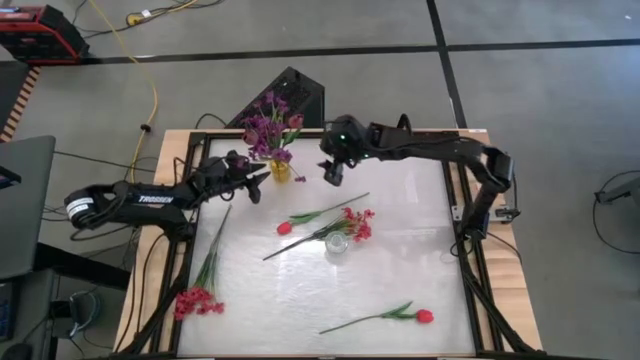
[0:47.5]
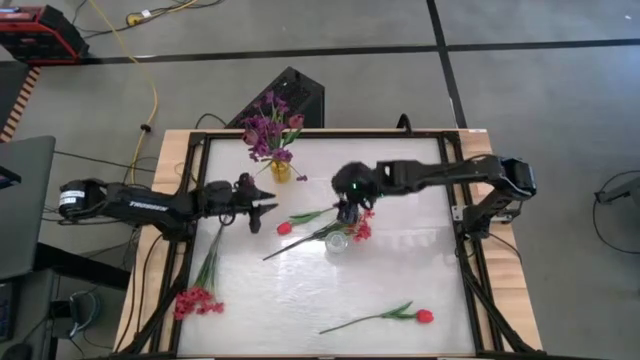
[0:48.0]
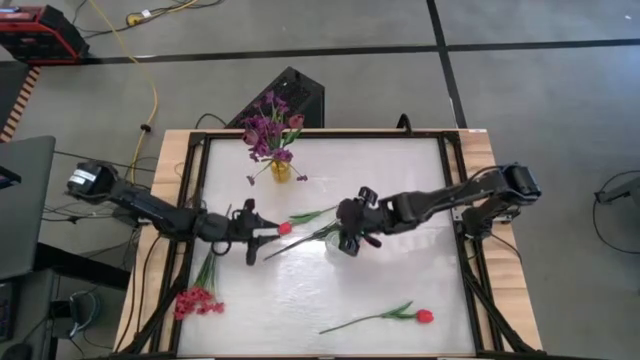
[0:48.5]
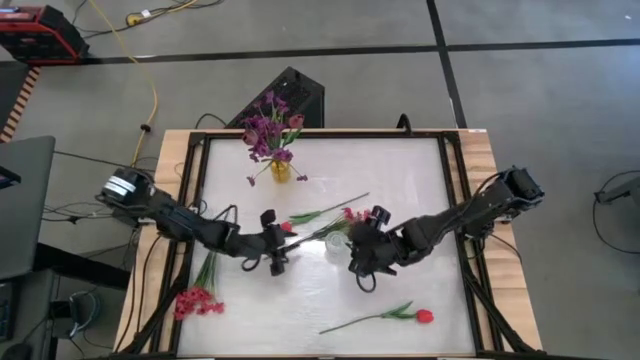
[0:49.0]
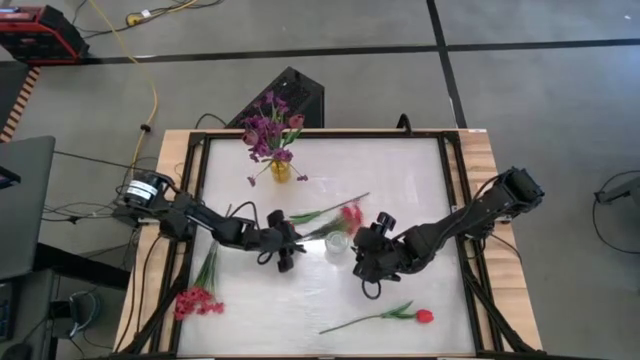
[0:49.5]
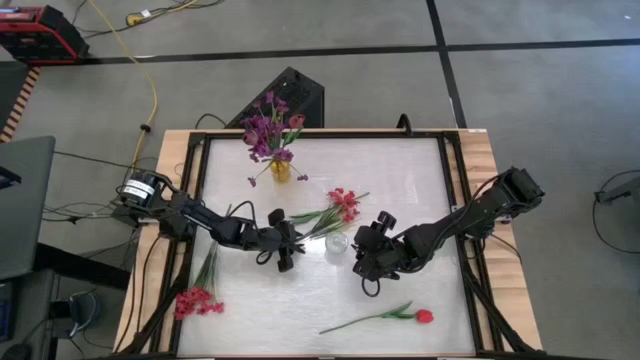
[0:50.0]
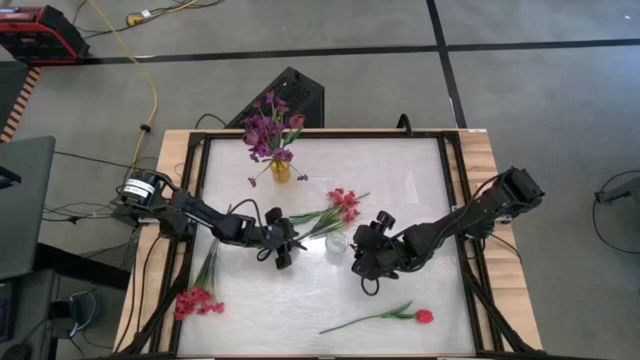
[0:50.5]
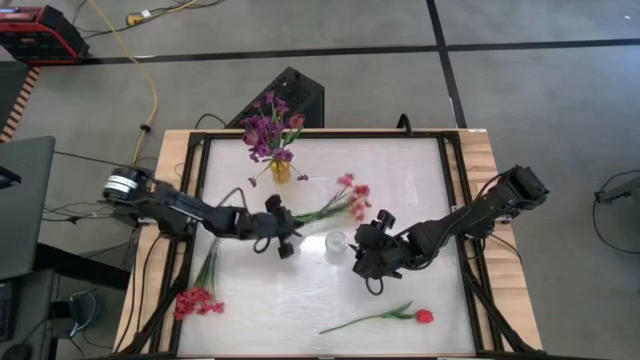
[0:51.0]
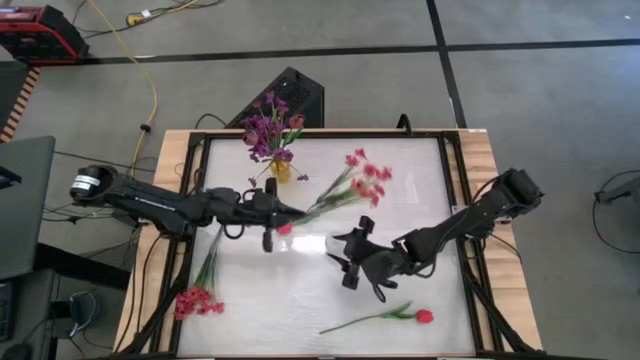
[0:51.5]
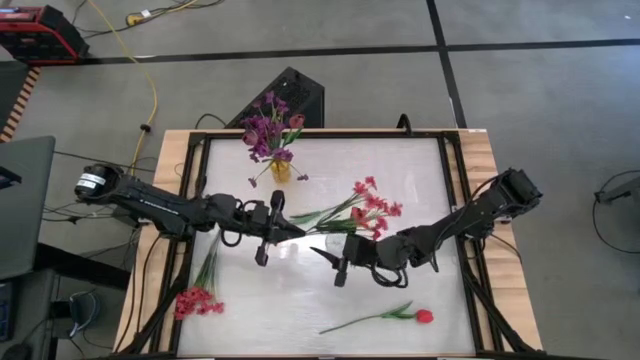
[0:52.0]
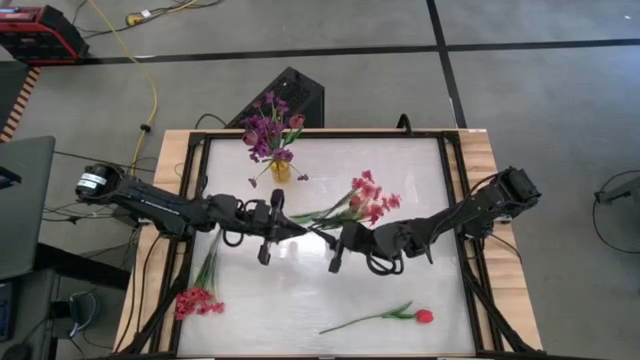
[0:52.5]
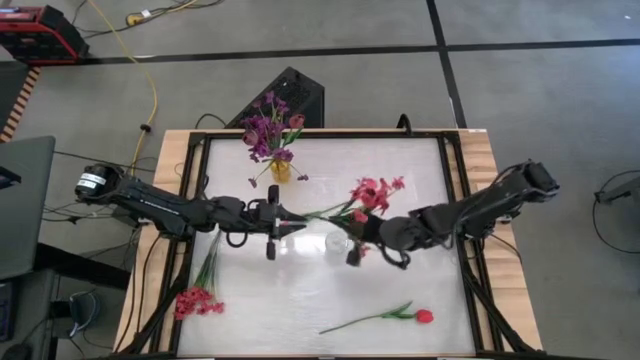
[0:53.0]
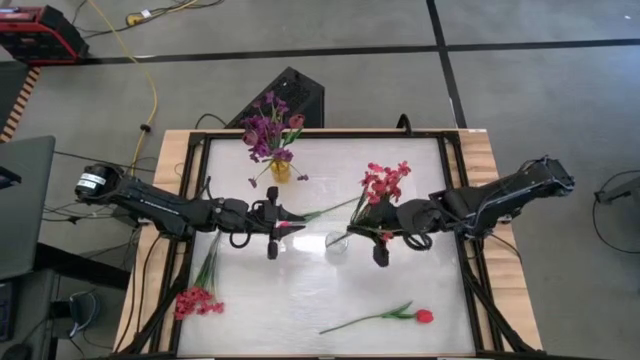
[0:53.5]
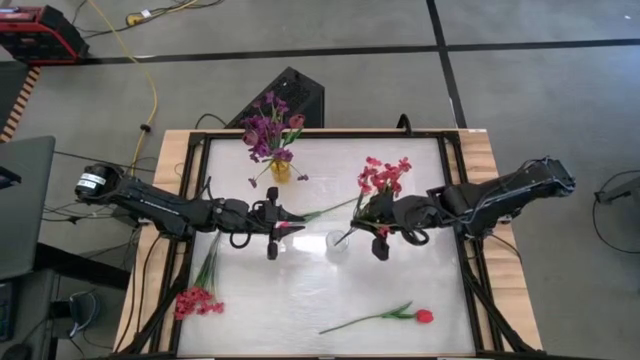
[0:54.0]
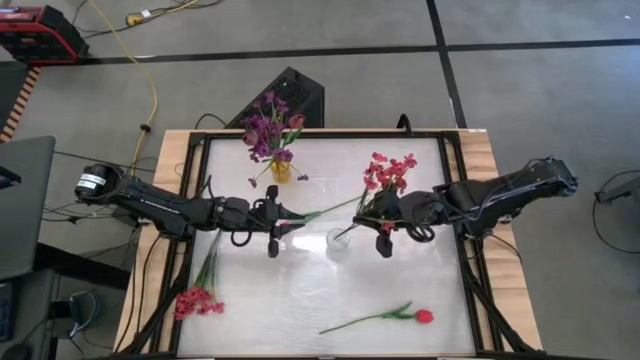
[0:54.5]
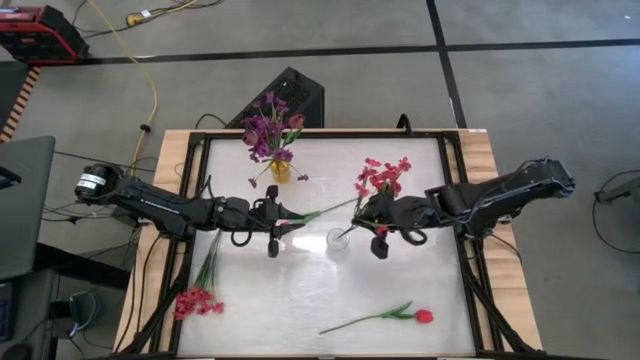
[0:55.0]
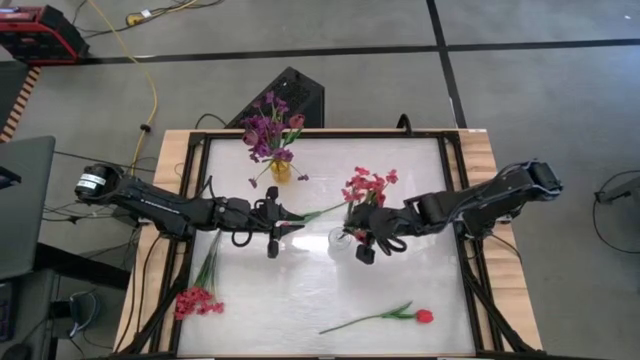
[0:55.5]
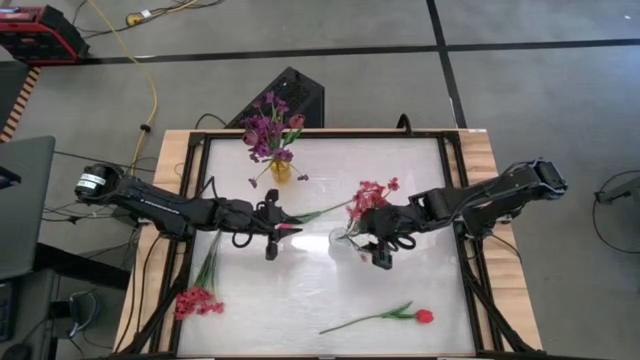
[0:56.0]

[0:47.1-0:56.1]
Task: Sort flowers into vase by color
Put the top red flowers into the transparent vase

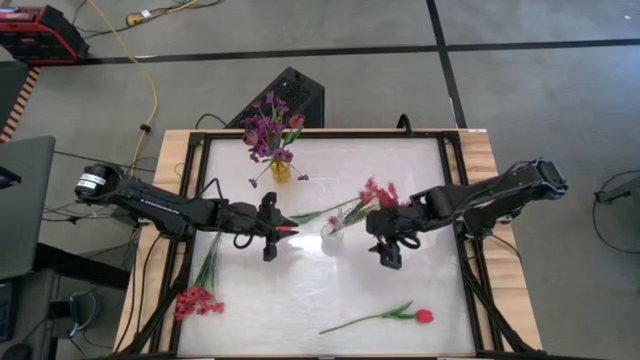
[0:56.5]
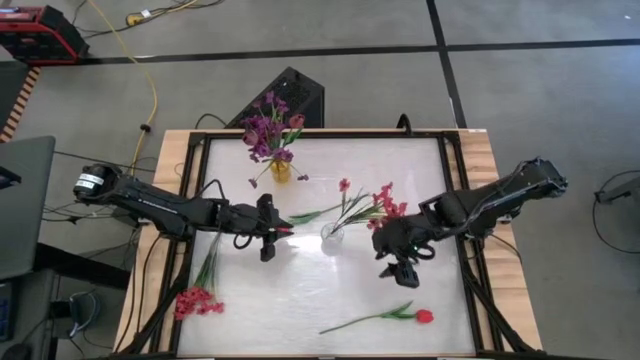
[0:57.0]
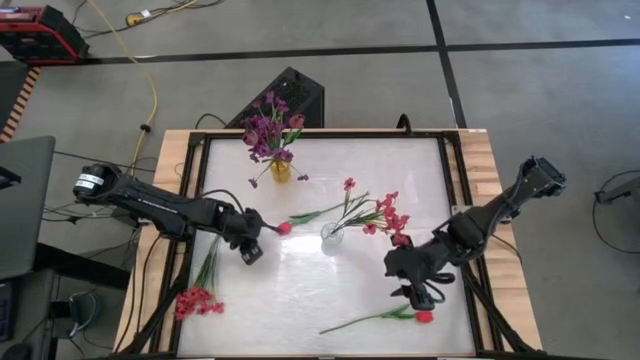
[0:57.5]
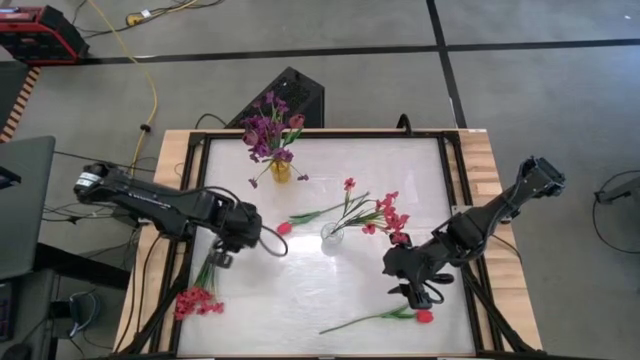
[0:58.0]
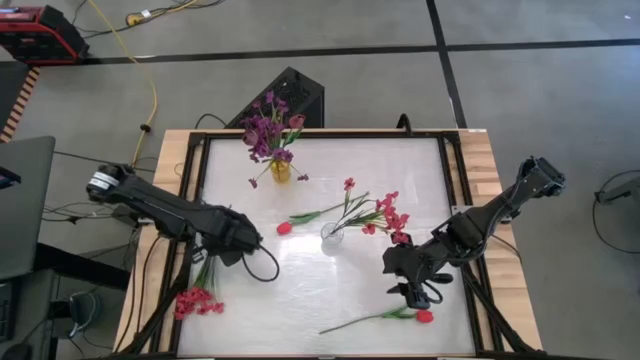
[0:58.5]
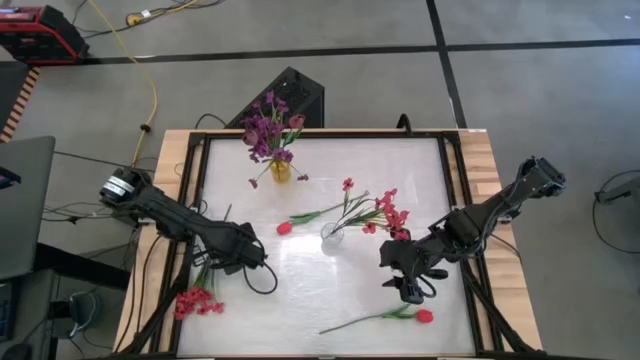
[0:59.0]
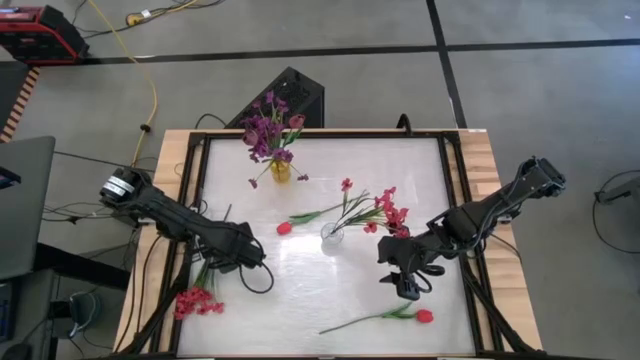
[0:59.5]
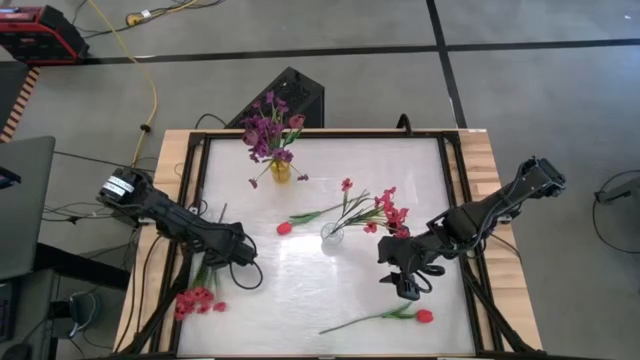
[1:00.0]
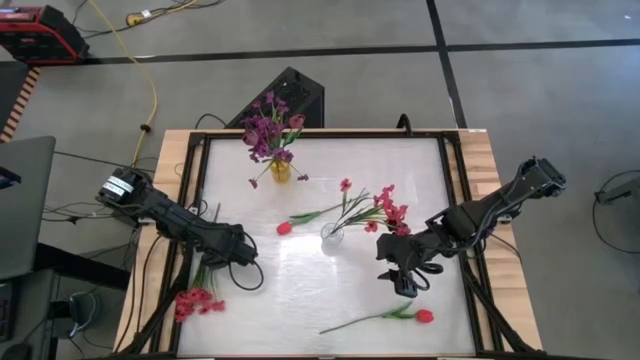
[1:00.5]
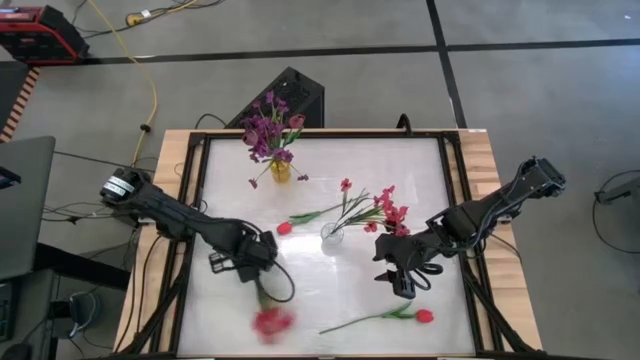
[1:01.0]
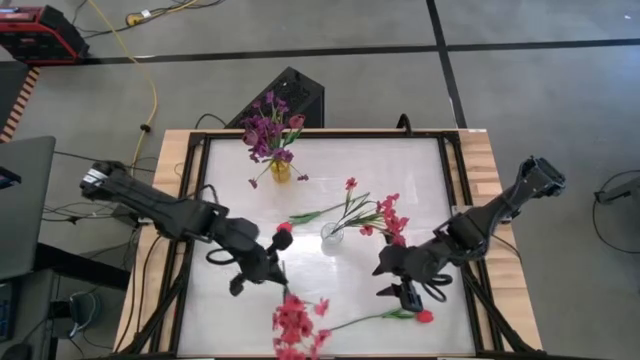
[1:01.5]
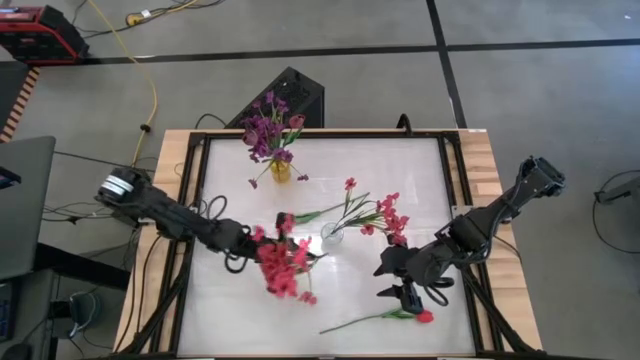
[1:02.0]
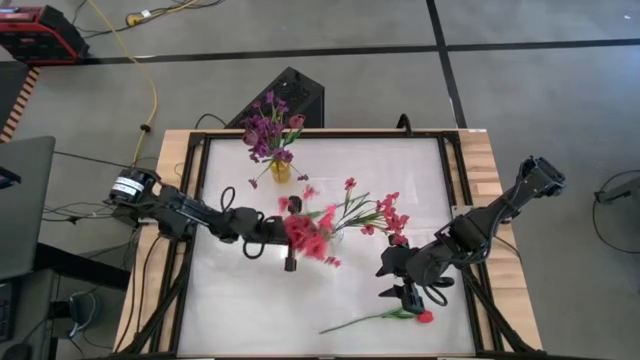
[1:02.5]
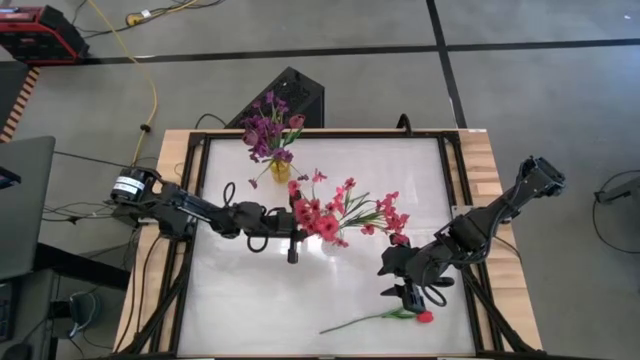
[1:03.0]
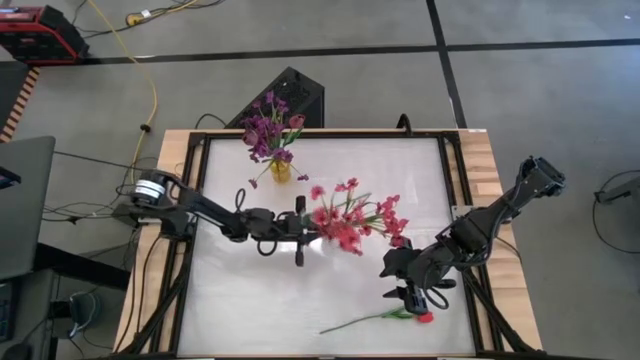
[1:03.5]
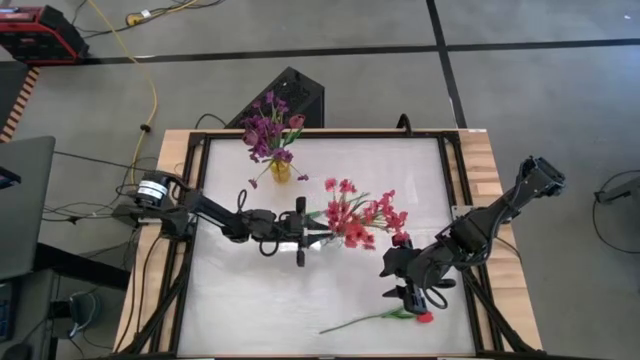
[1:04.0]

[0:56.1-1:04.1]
Put the red flowers into the transparent vase

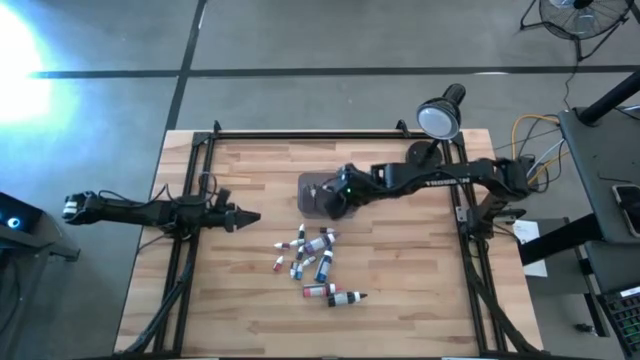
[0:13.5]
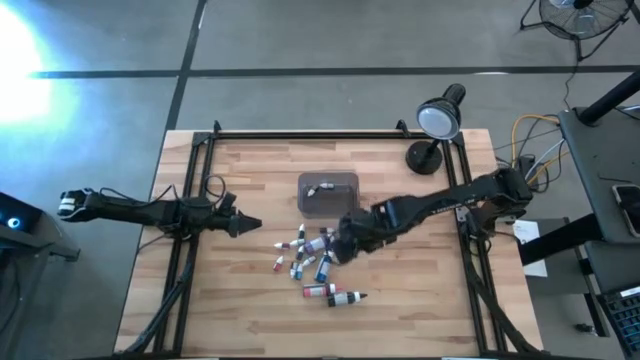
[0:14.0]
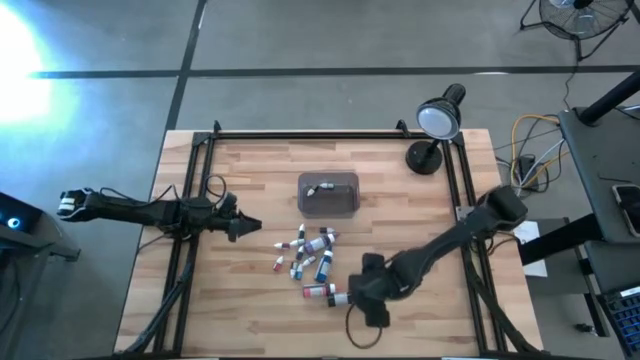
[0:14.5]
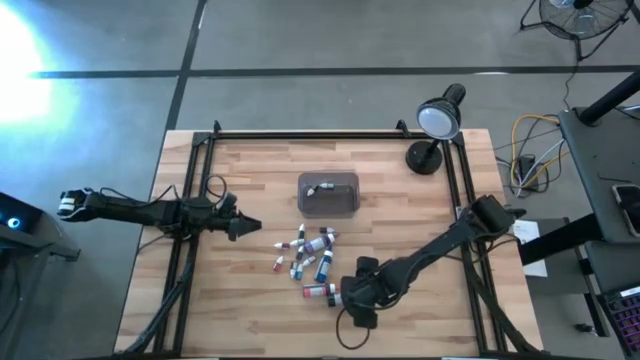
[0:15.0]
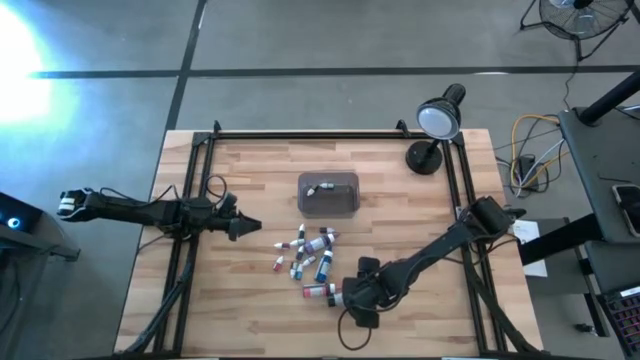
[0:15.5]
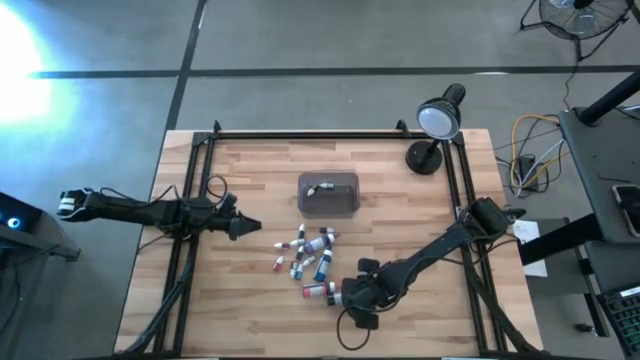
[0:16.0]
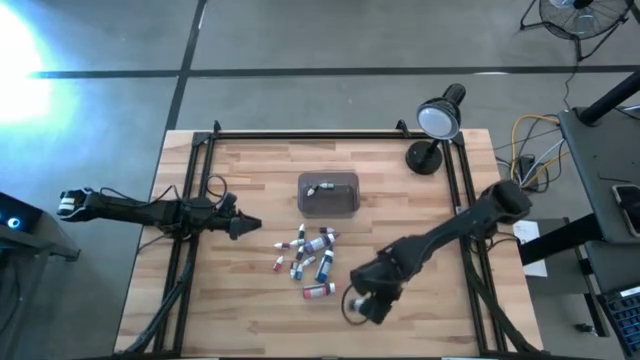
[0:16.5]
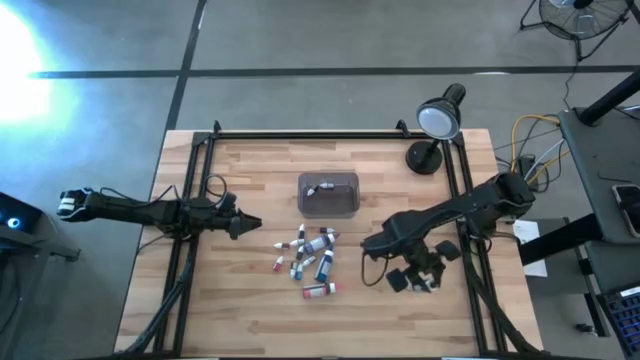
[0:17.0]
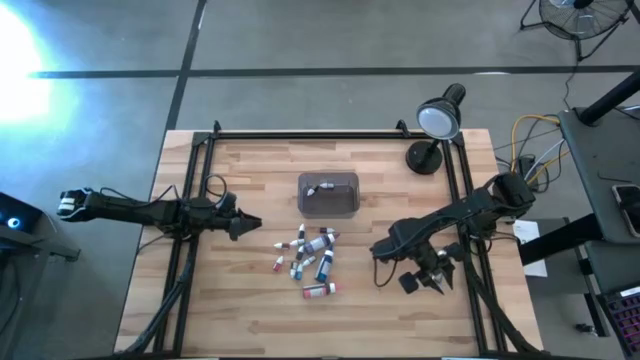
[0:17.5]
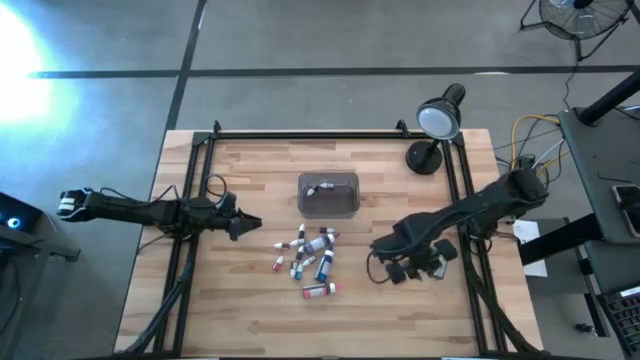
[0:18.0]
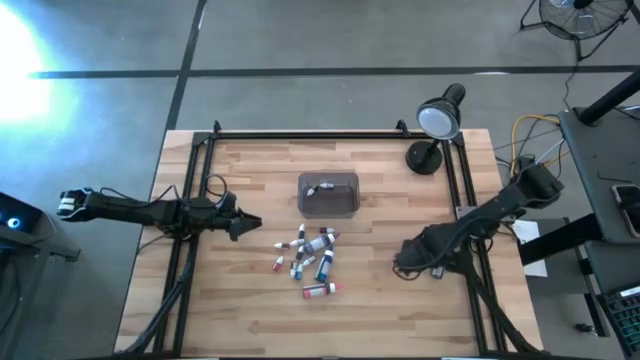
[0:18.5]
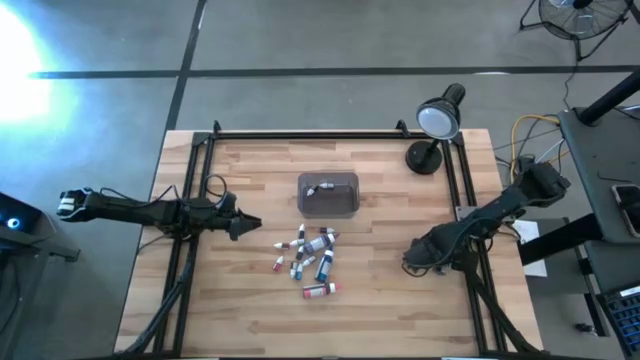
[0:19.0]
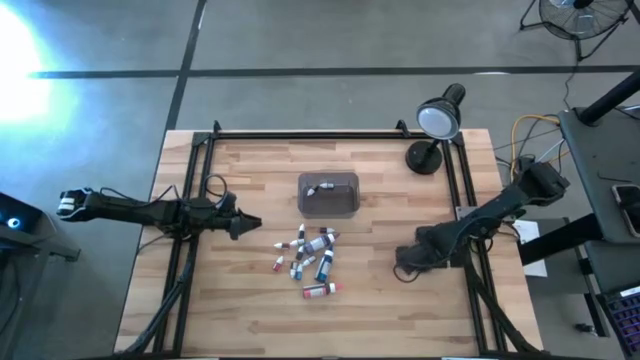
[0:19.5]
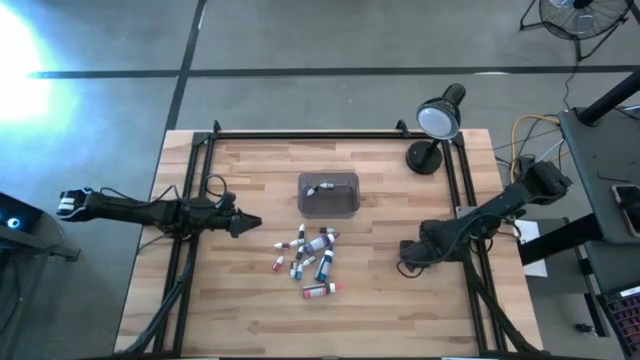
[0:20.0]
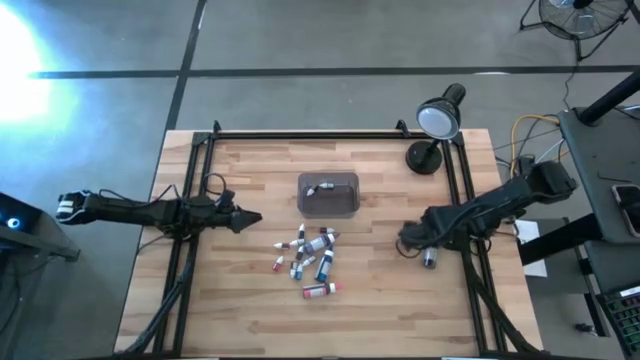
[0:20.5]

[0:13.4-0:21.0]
Task: Pick & Place food coloring
Put the large black food coloring bottle into the bin
